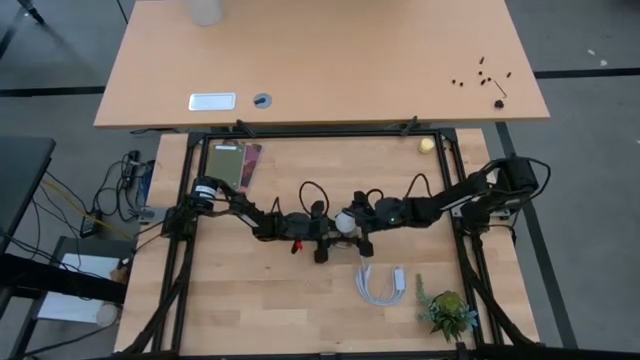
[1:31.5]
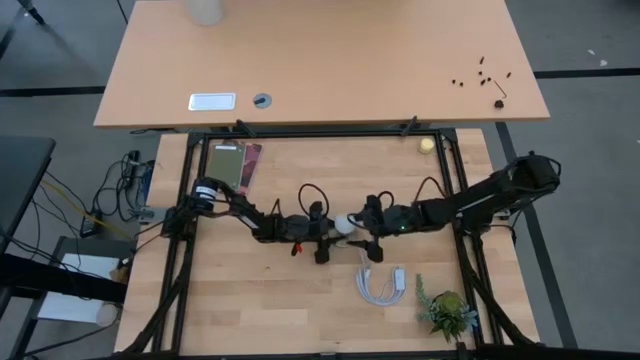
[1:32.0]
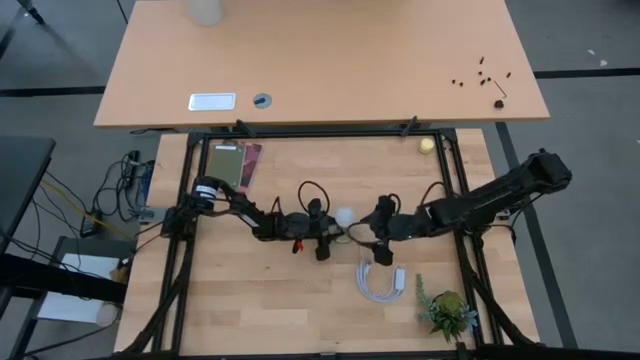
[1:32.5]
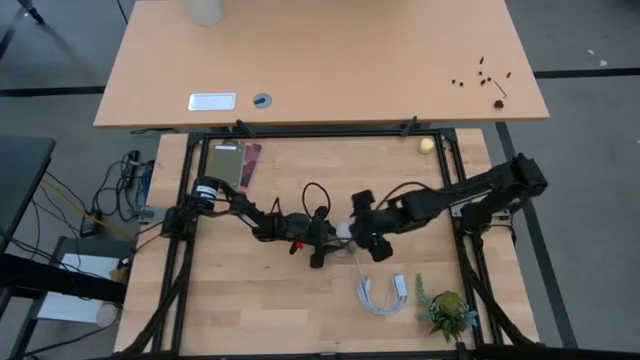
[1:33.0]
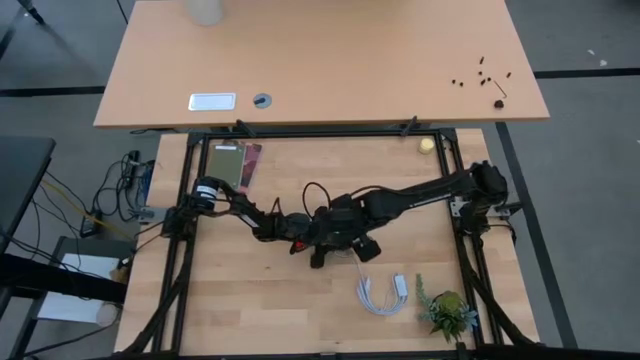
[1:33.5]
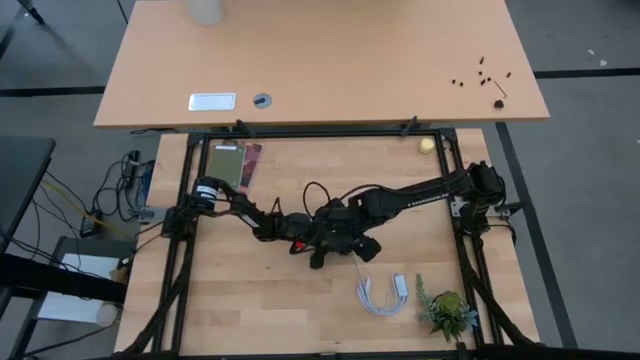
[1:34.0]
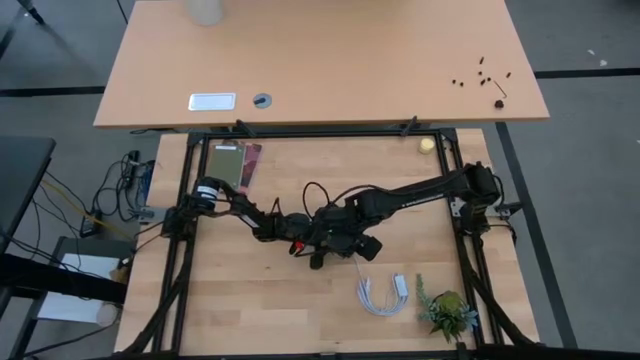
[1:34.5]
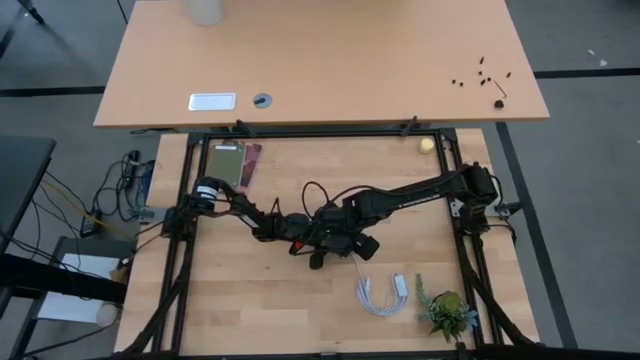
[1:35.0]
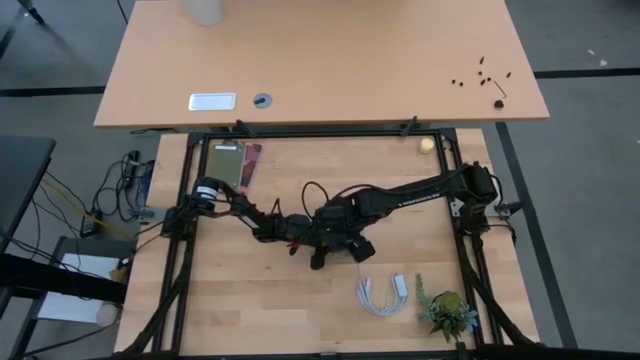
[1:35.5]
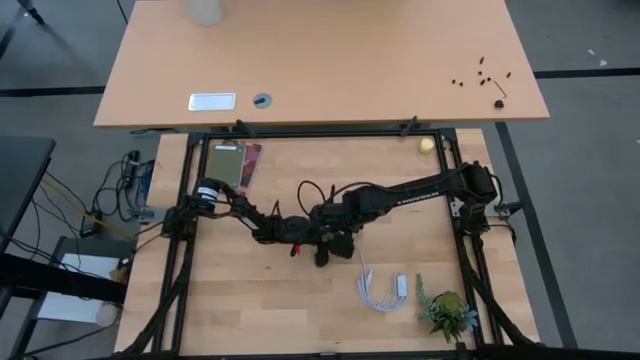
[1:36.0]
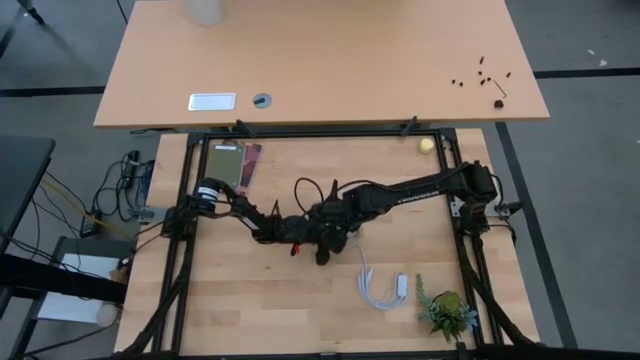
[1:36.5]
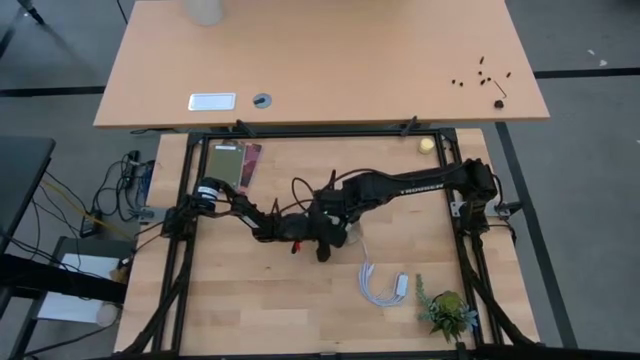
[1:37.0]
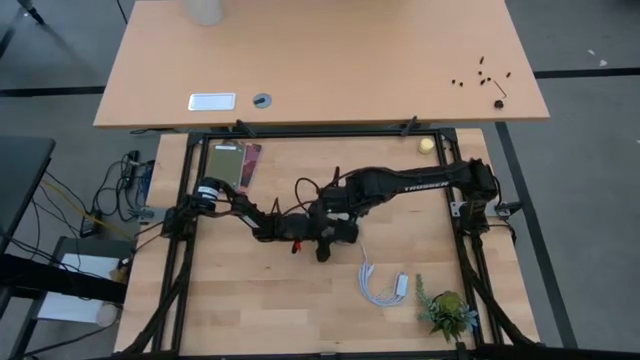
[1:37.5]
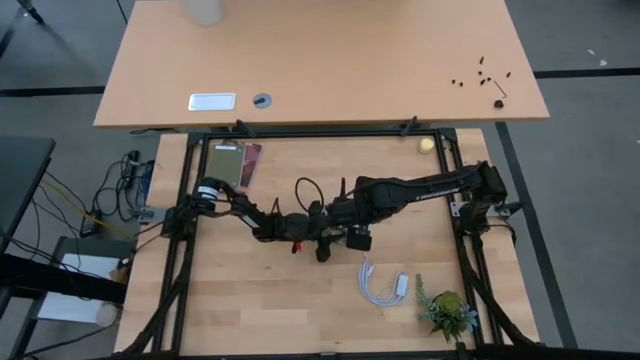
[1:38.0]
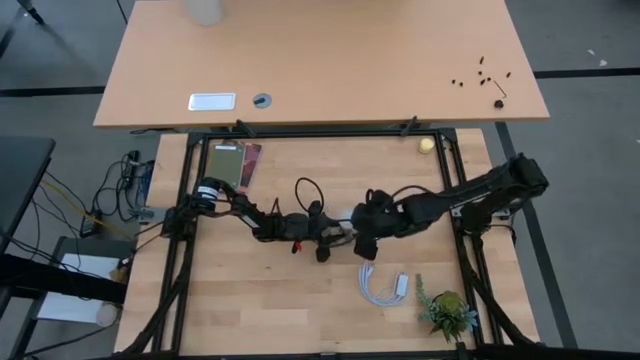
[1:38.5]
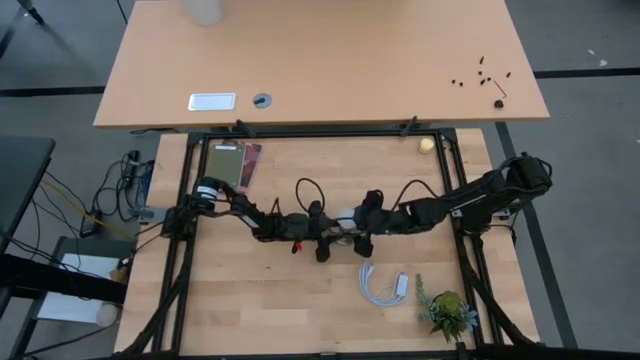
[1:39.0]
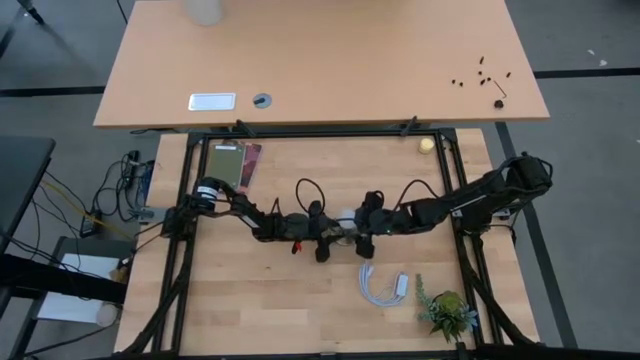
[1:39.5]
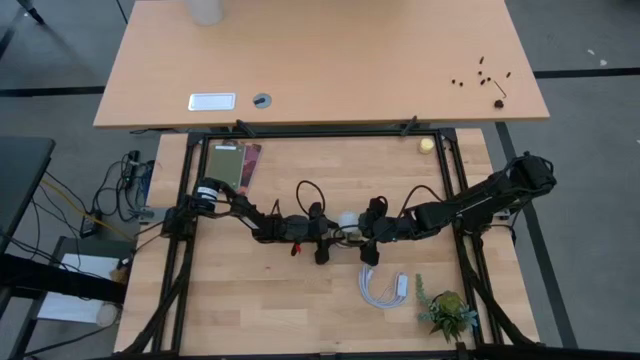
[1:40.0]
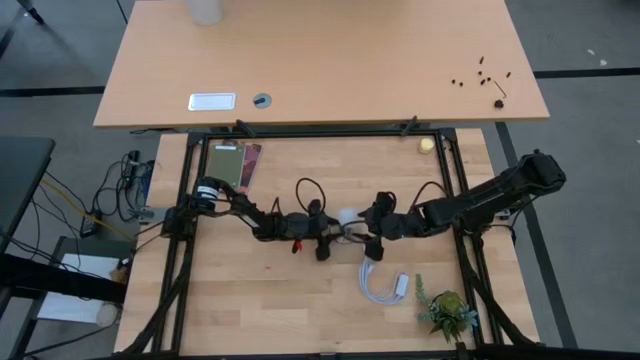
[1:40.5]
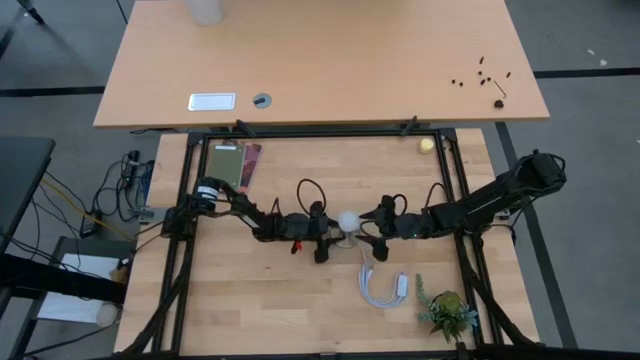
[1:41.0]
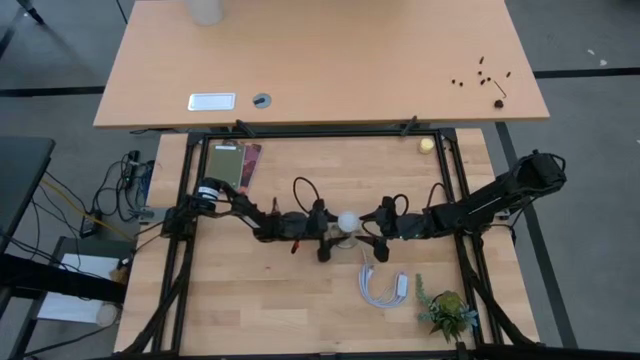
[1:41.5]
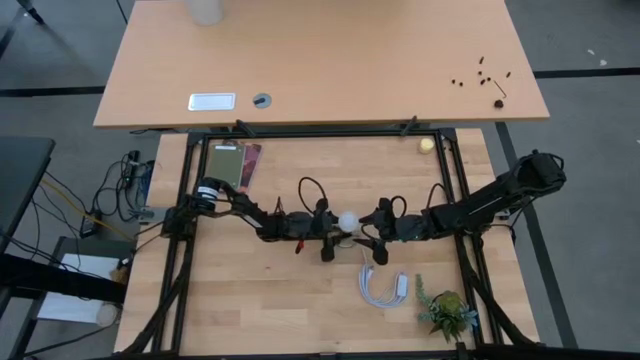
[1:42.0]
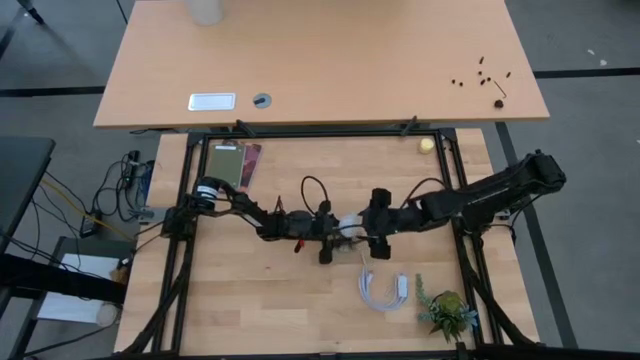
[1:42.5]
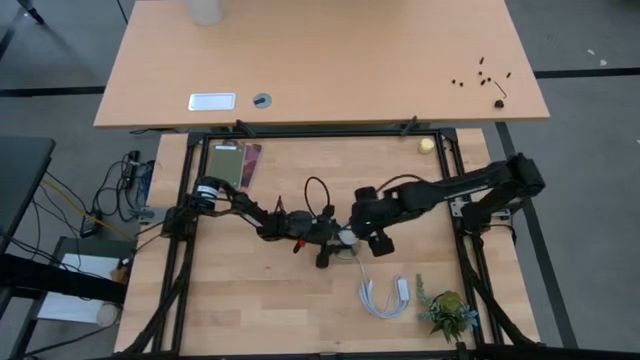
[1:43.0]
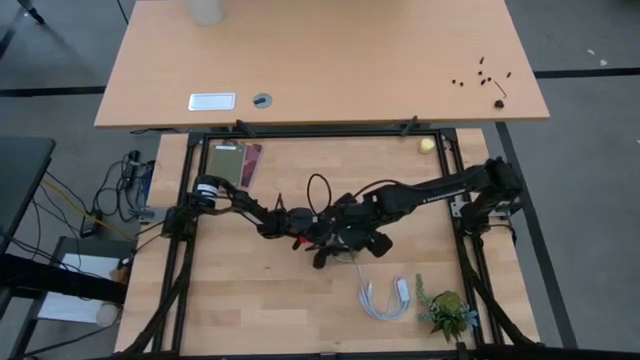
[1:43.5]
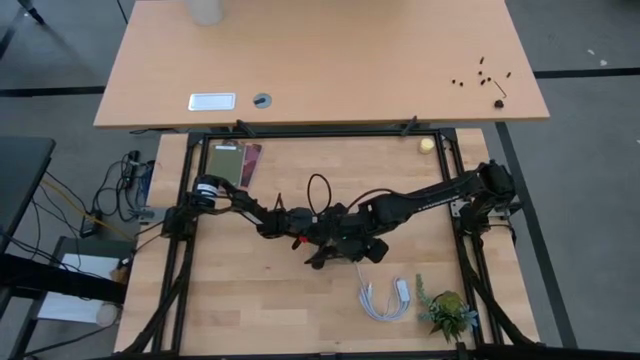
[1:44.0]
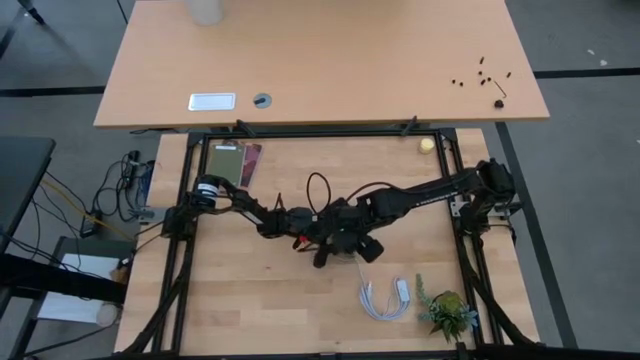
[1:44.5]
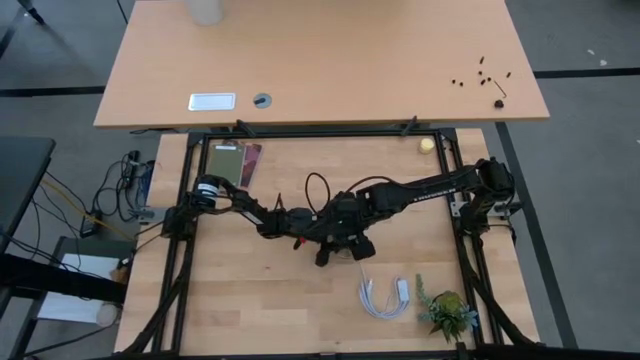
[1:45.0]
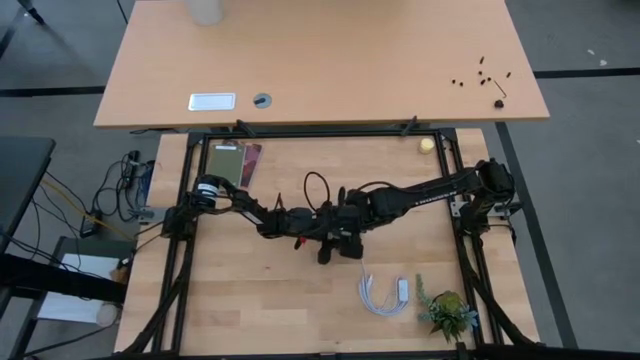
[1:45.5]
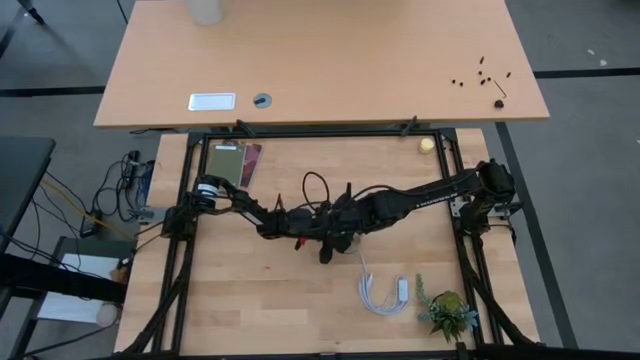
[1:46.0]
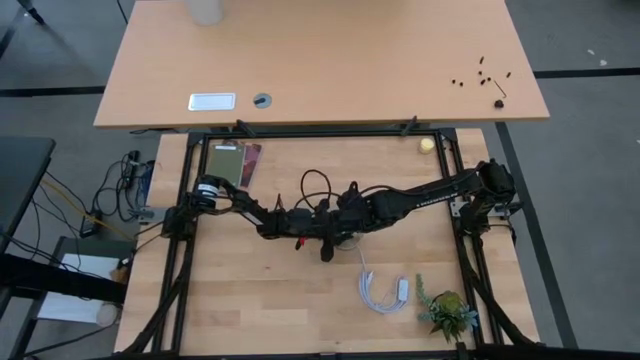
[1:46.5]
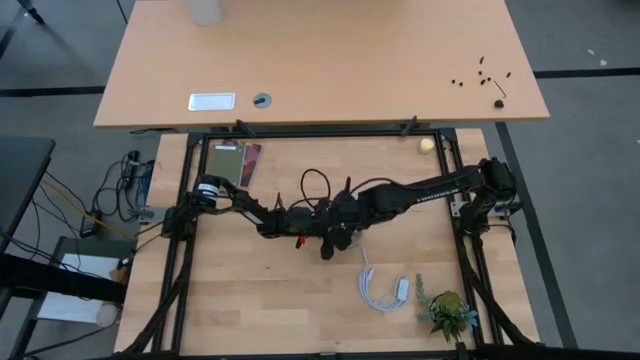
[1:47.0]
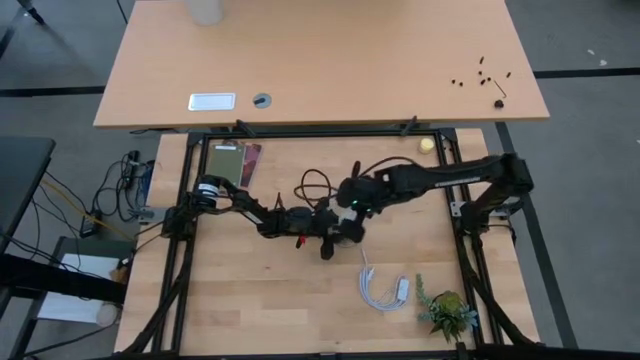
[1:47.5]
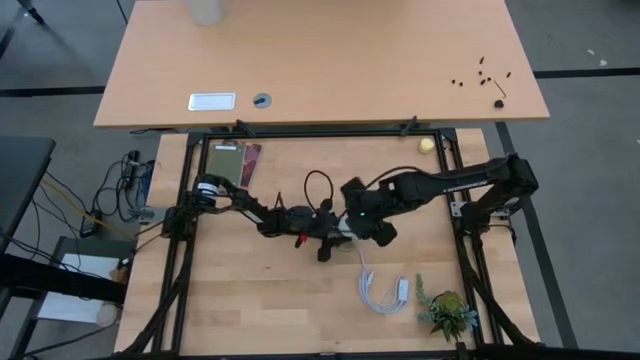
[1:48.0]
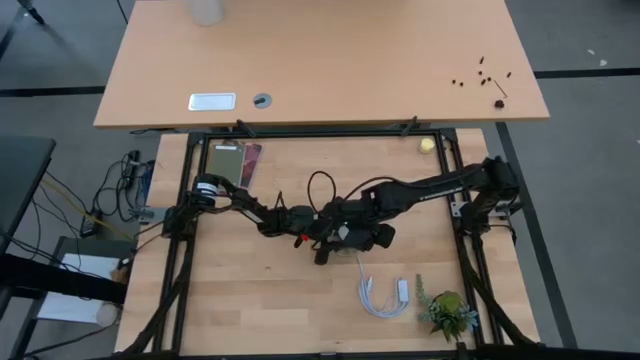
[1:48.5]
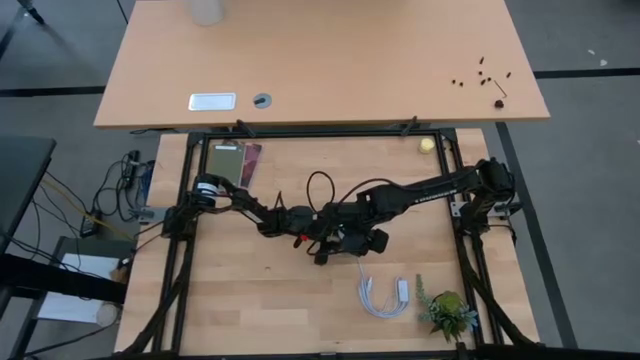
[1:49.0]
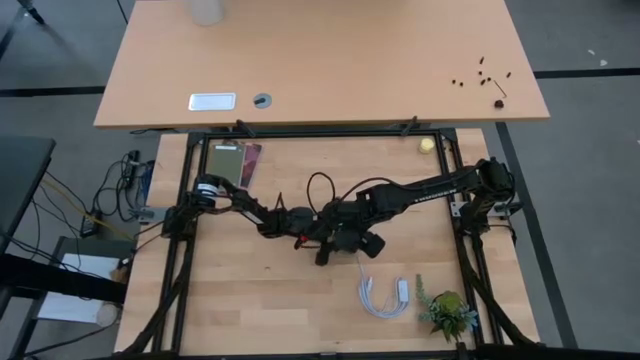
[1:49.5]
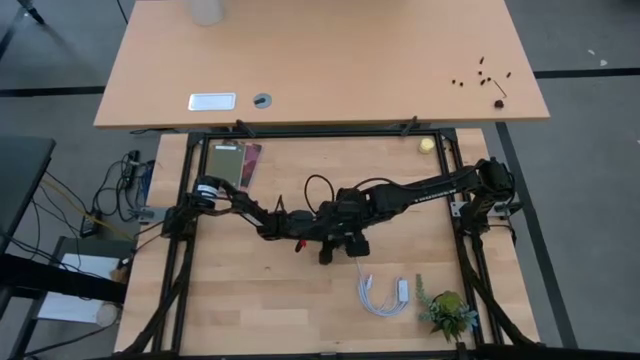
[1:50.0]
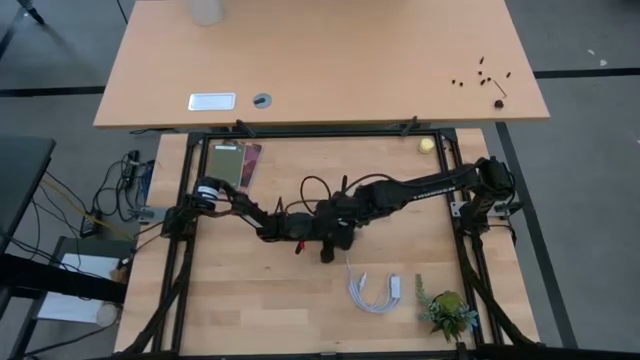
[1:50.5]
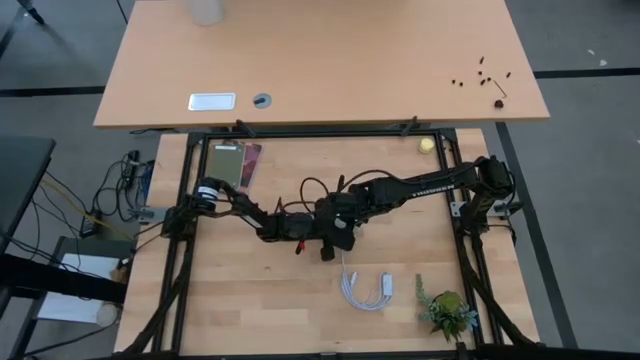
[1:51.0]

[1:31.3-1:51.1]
Task: Screw lightbulb
Insert the white lightbulb into the desk lamp

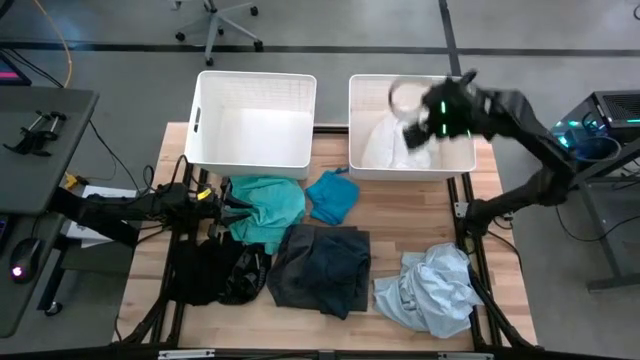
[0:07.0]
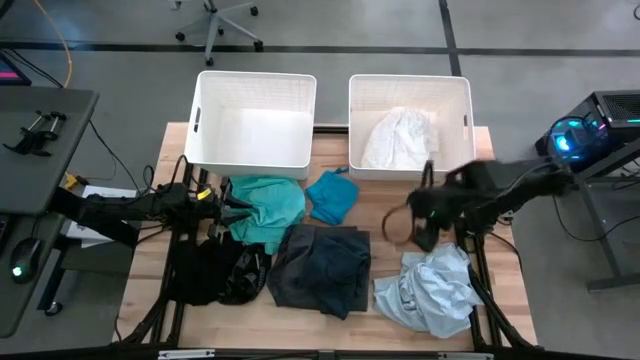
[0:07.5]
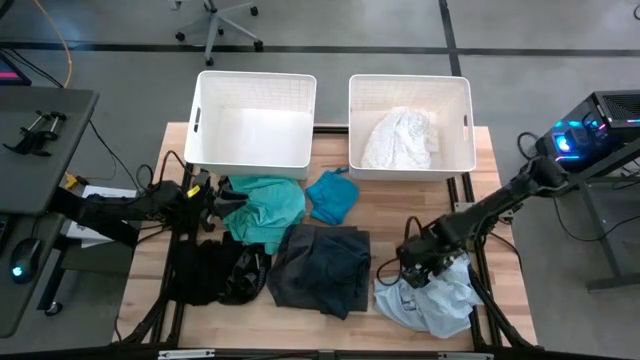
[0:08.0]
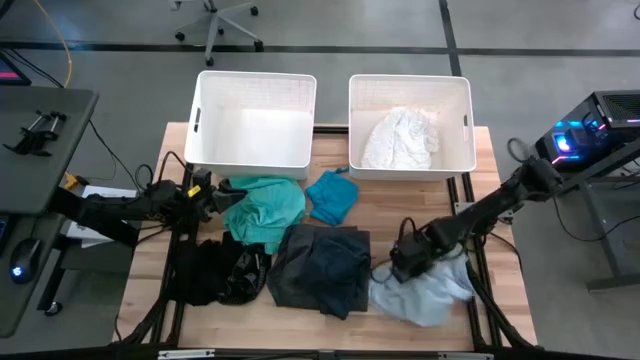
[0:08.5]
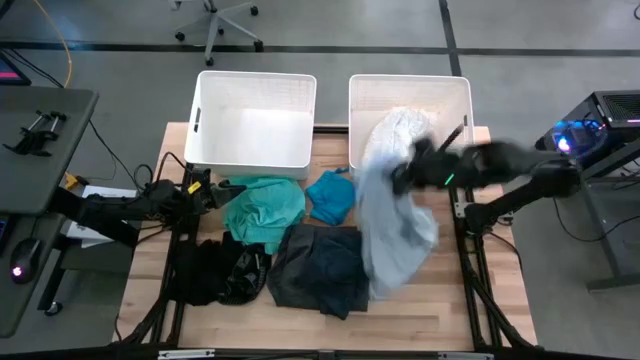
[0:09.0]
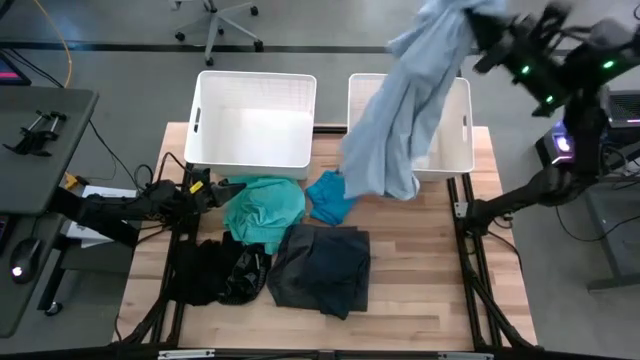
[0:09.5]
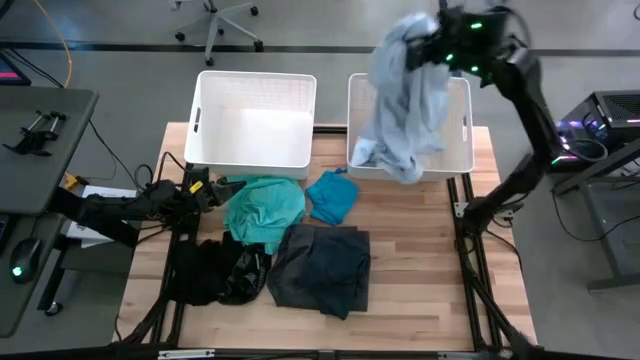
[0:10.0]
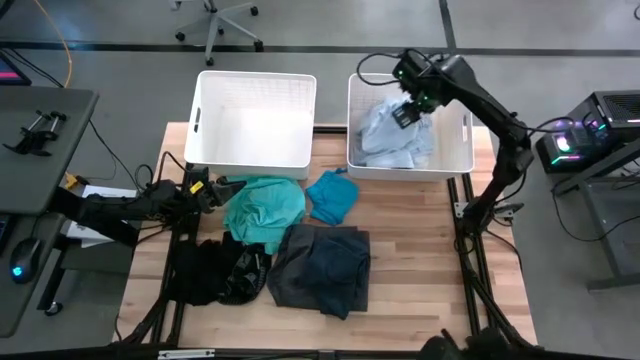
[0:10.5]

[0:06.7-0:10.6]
Task: Sort clothes
Put the patterned white shirt into the right white bin
